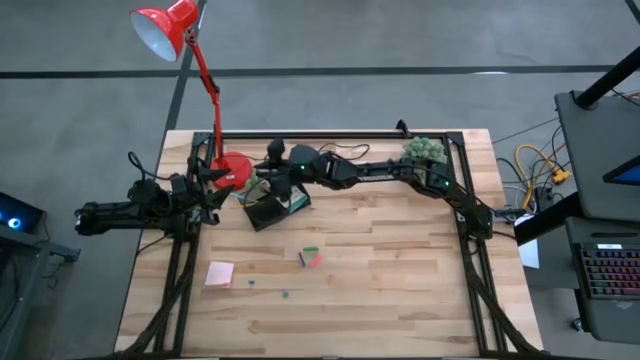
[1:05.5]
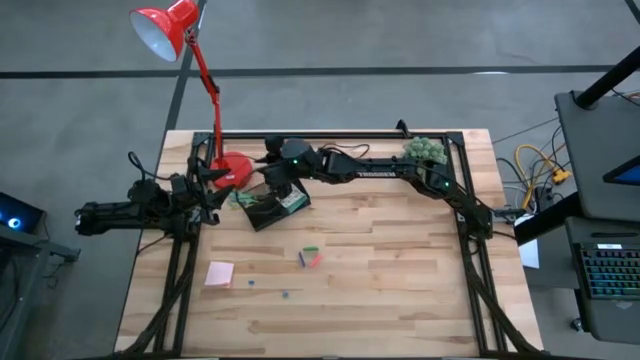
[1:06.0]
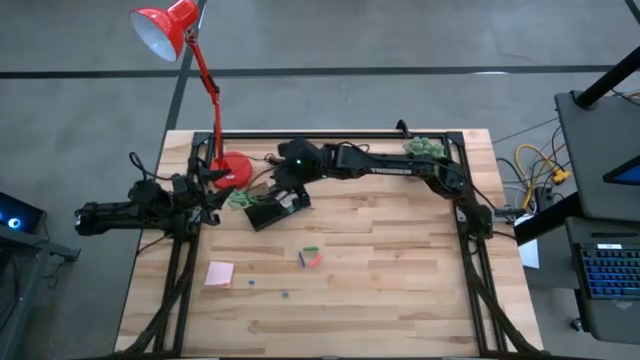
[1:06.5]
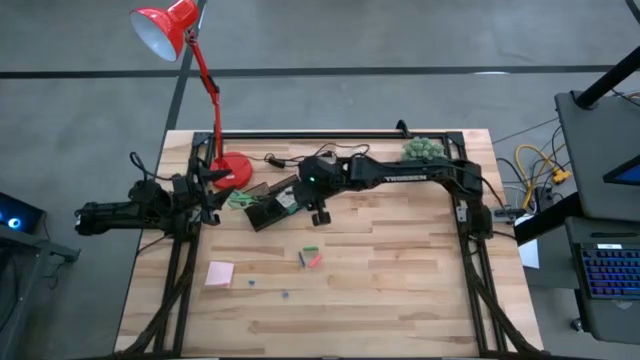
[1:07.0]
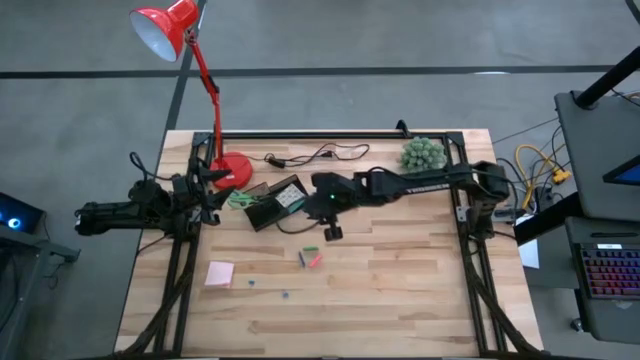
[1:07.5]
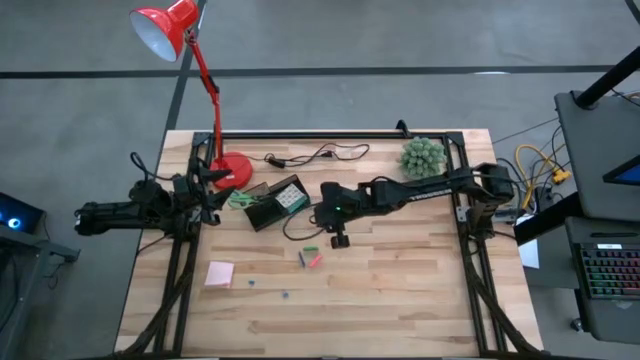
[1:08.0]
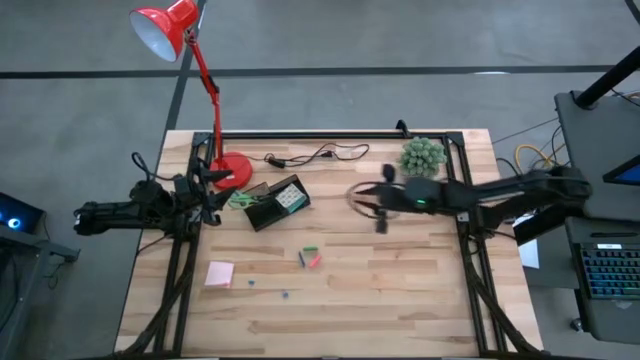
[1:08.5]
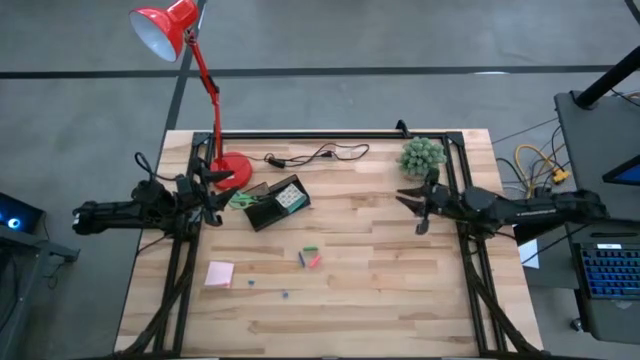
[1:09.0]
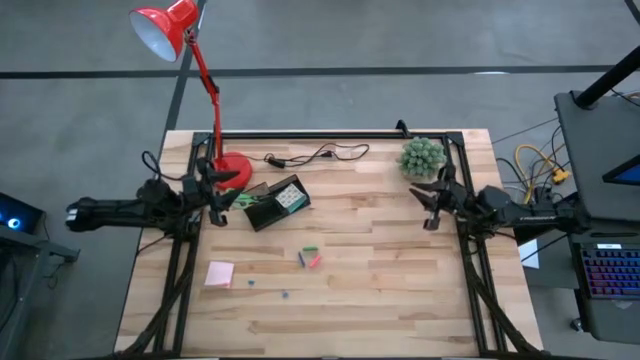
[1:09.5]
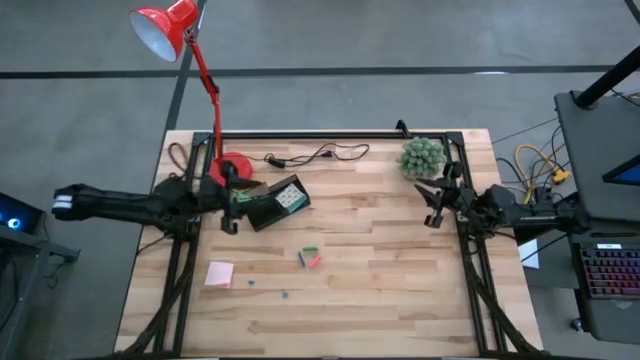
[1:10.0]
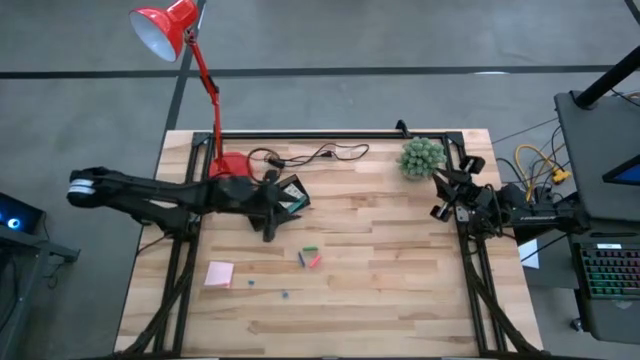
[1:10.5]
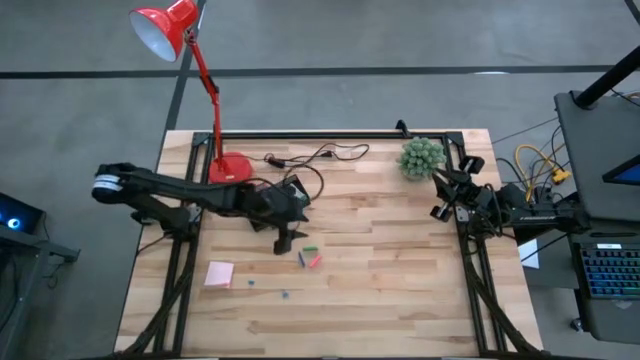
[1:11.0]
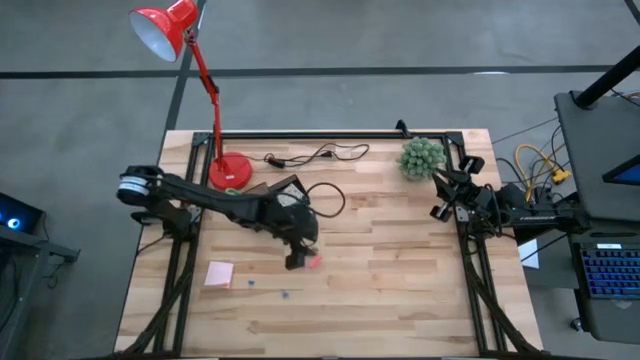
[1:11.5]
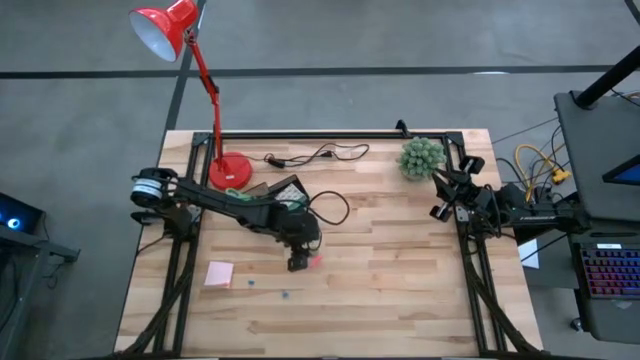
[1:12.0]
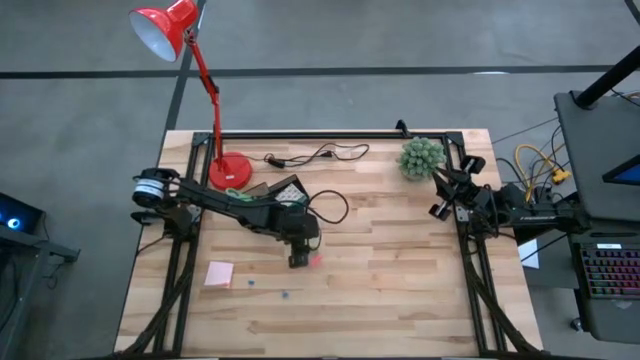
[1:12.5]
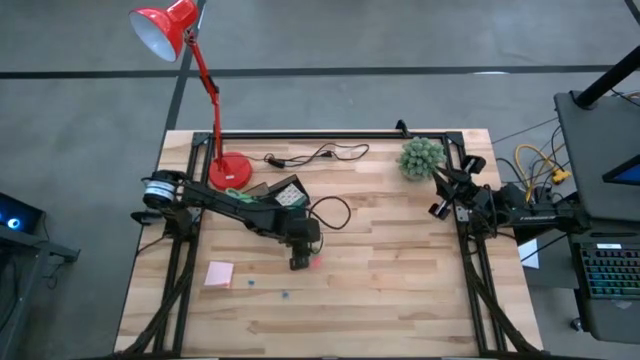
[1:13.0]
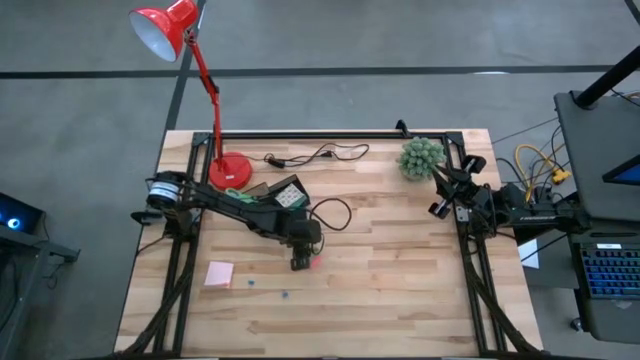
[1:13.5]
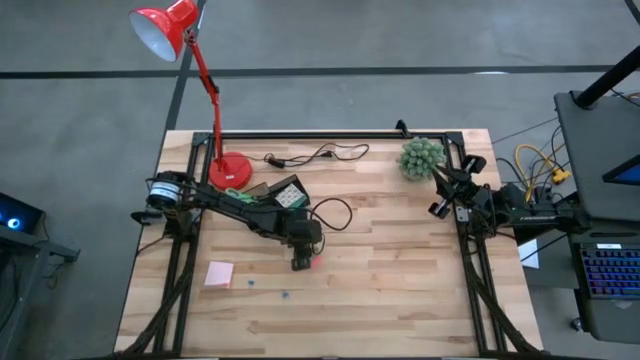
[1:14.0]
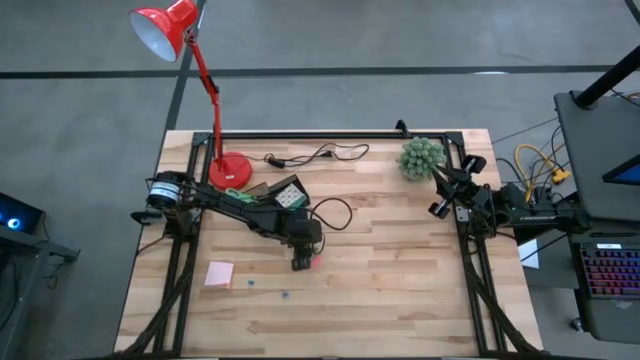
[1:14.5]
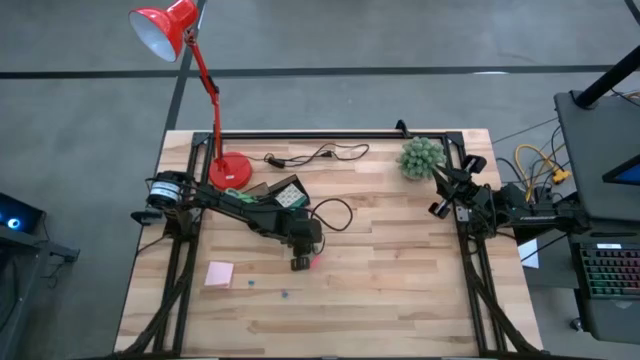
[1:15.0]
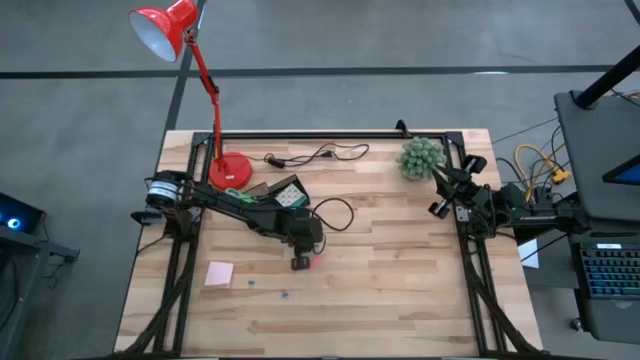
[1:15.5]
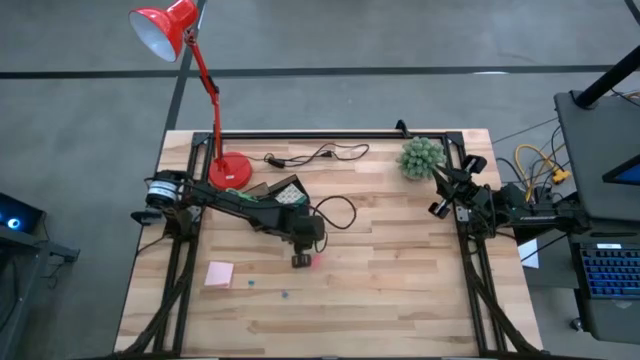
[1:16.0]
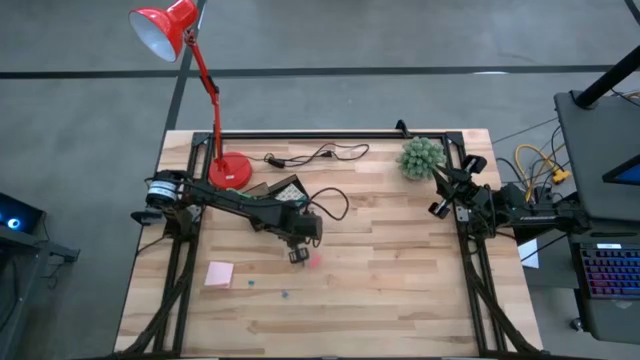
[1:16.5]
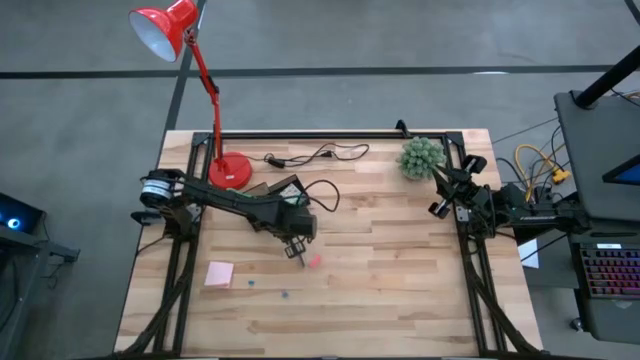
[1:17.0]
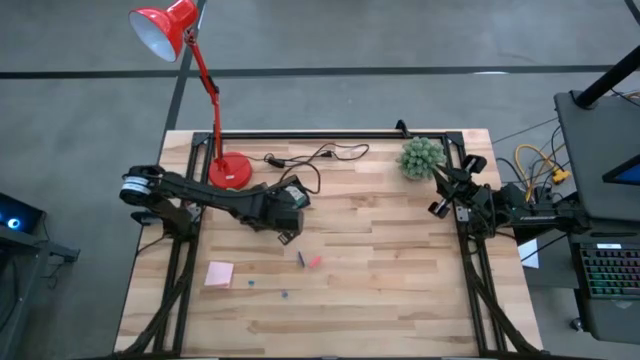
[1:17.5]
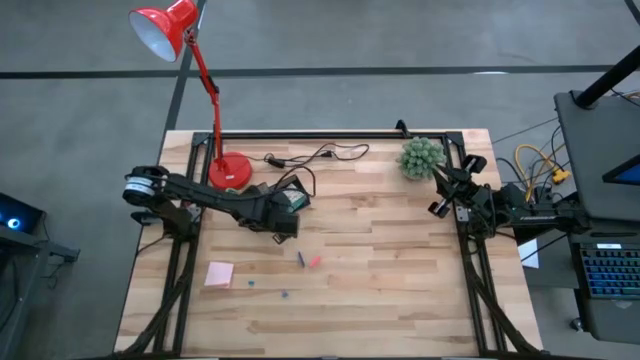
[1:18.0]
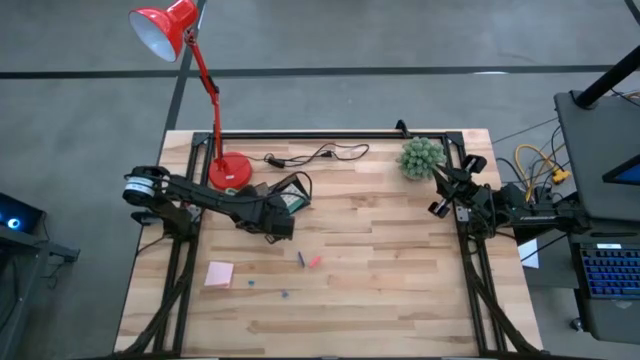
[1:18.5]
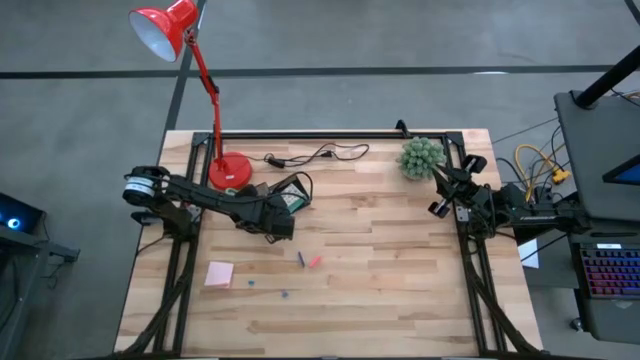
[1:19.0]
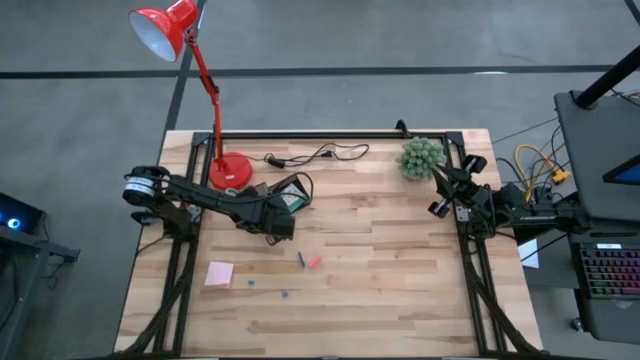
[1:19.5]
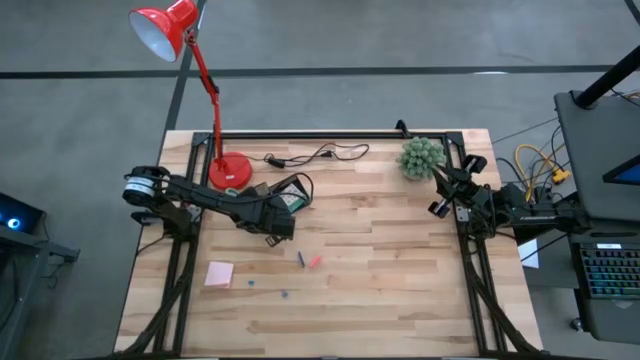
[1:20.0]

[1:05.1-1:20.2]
Task: Pick and place office supplies into organizer
Put the green eraser into the desk organizer

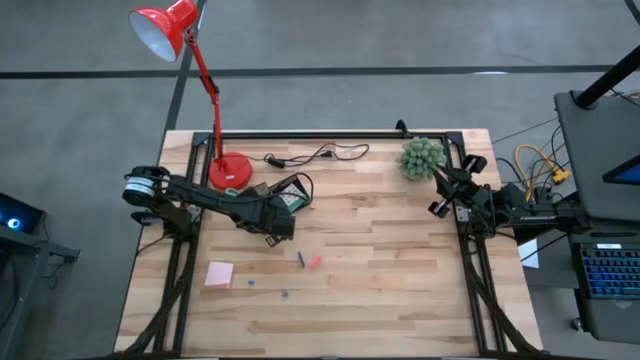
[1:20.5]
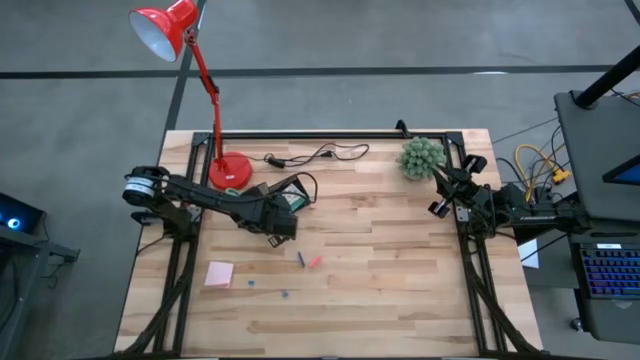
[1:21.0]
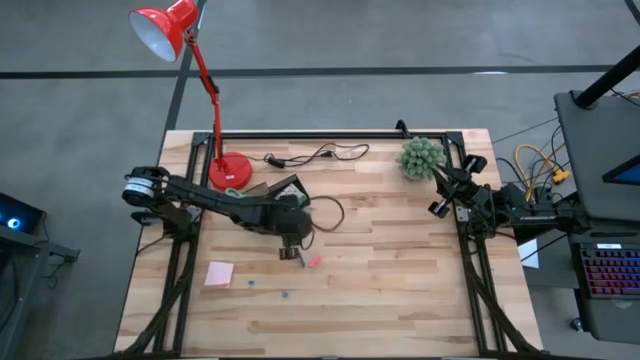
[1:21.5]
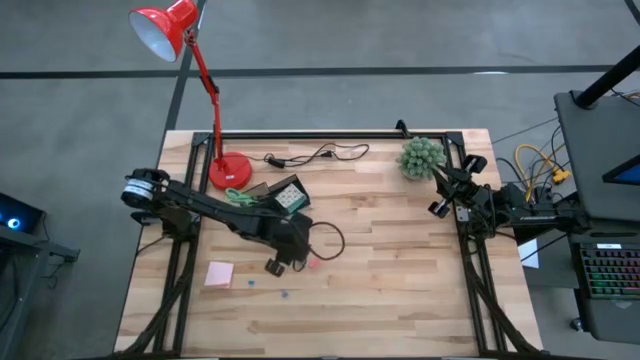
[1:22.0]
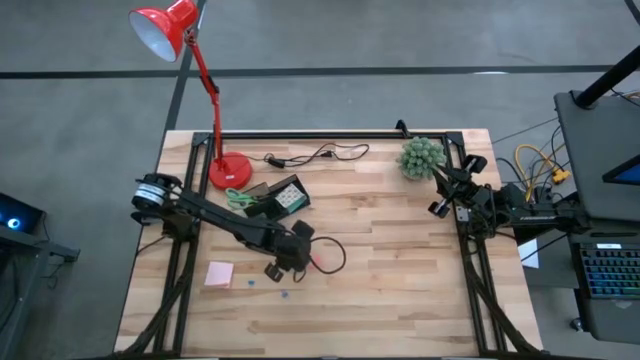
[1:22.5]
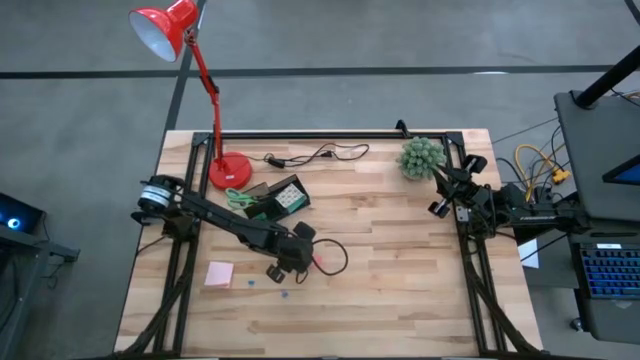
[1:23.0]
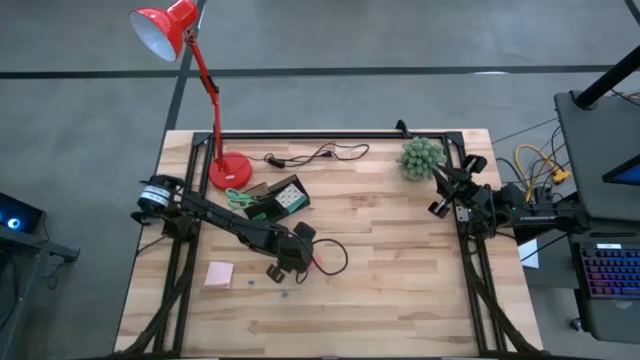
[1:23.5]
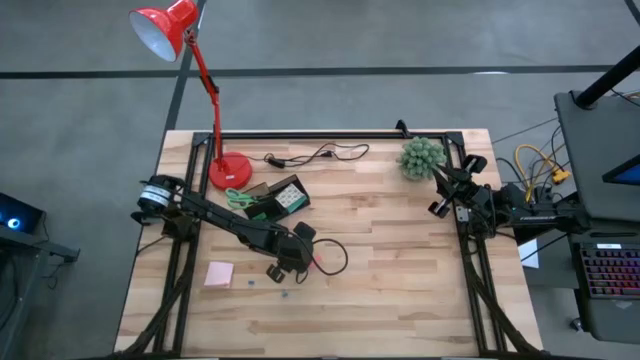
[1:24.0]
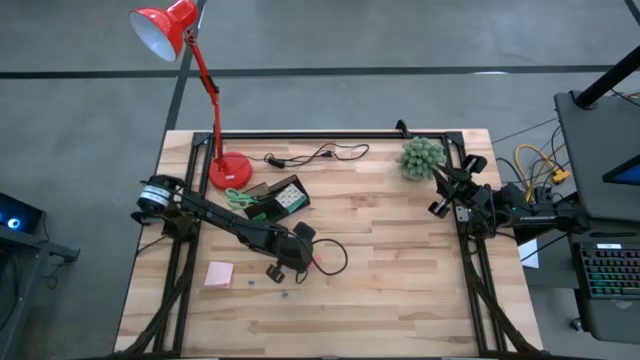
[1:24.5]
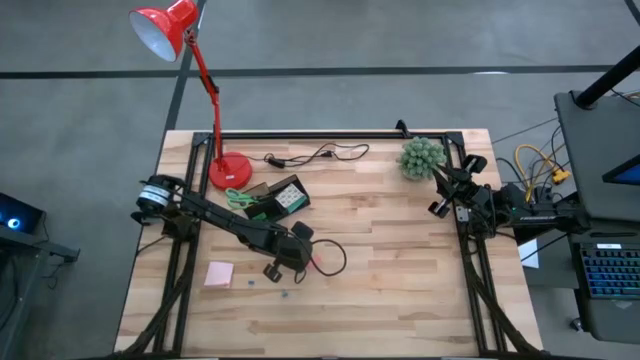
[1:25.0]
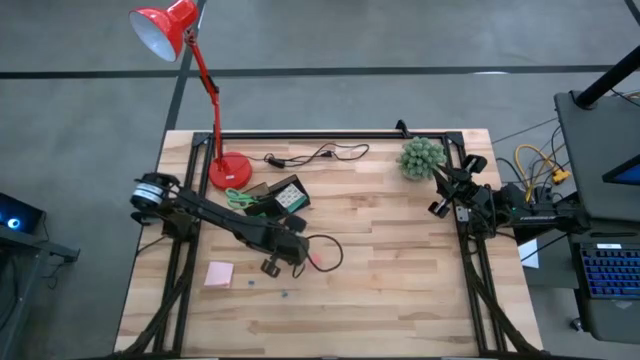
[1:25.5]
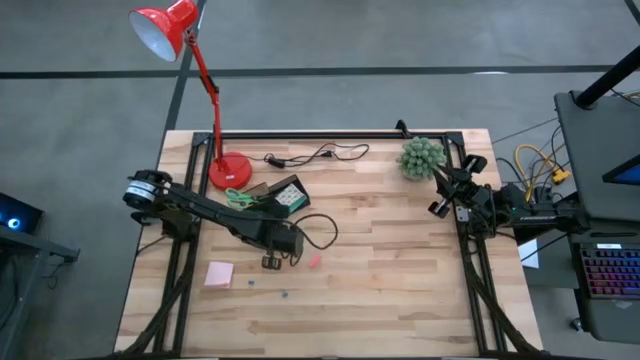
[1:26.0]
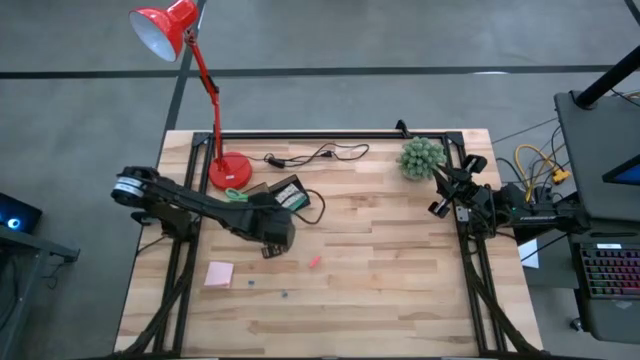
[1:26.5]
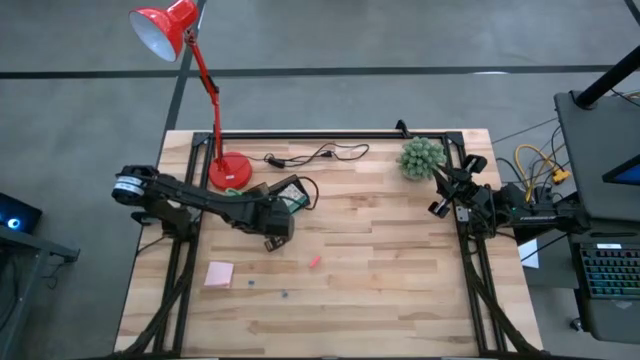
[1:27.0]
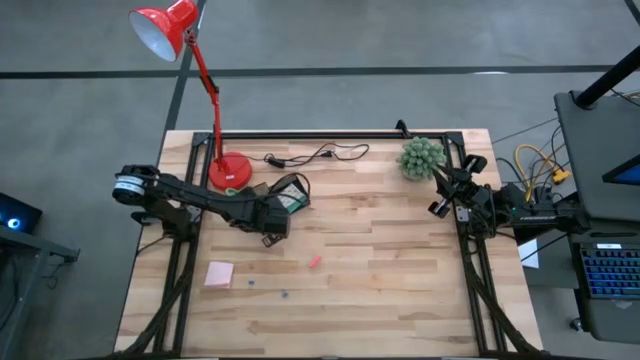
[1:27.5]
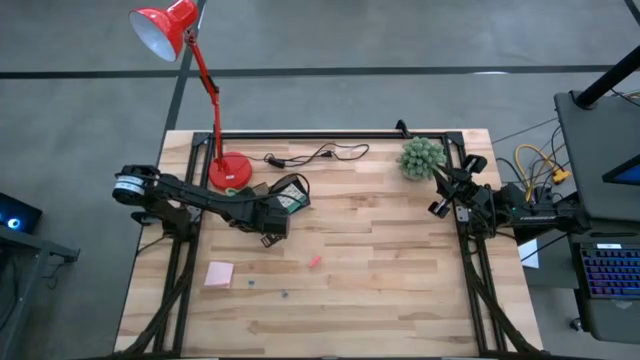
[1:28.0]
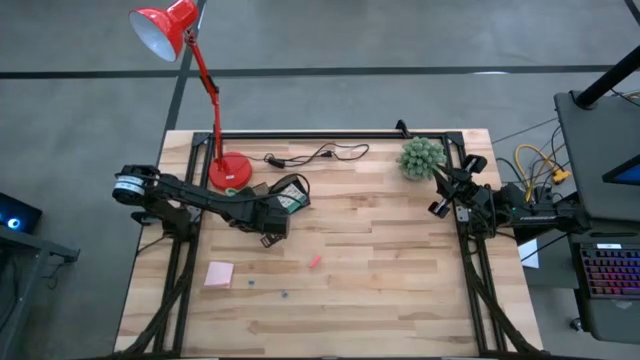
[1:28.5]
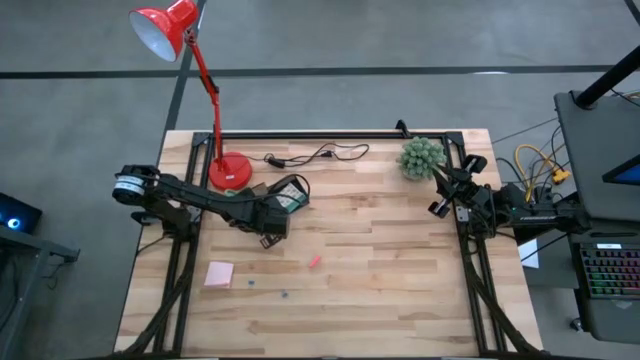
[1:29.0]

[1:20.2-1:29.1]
Put the blue eraser into the desk organizer
